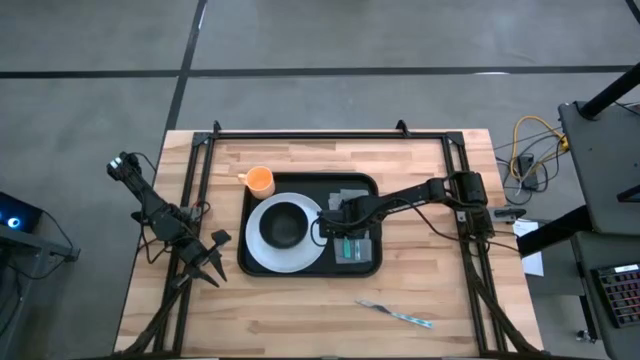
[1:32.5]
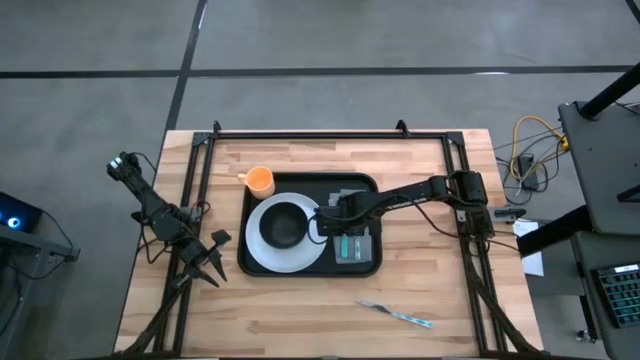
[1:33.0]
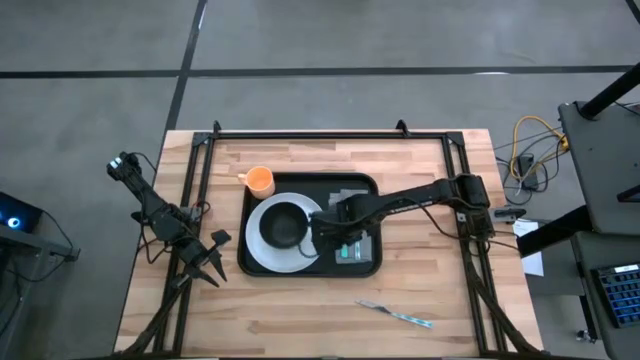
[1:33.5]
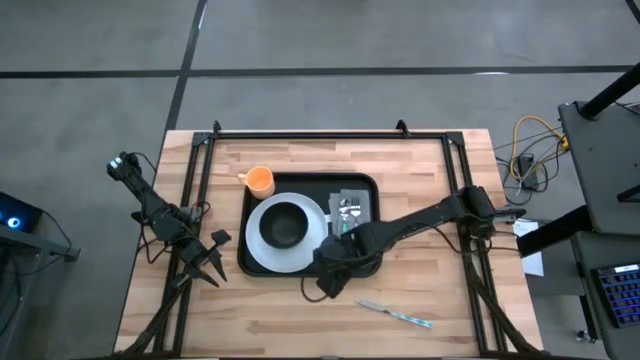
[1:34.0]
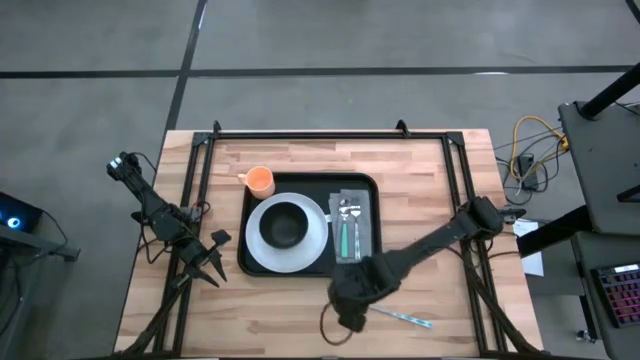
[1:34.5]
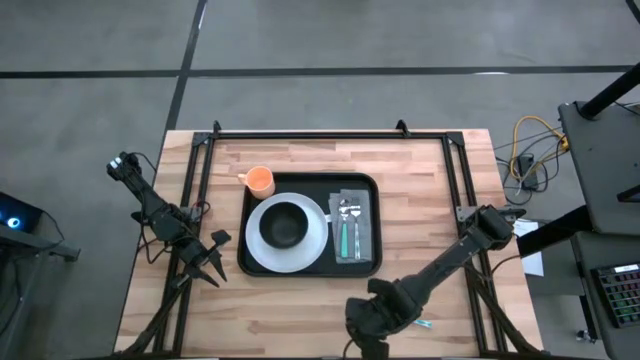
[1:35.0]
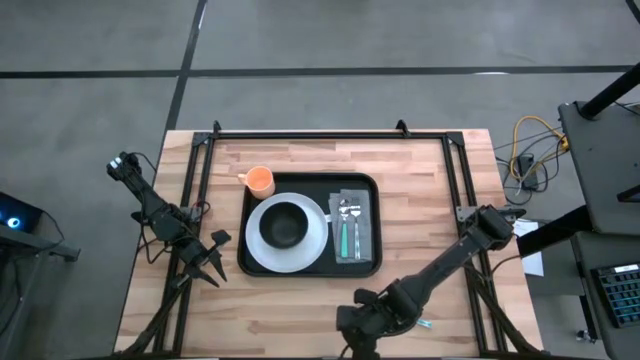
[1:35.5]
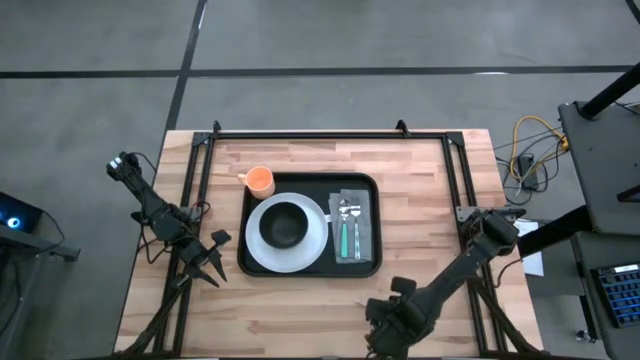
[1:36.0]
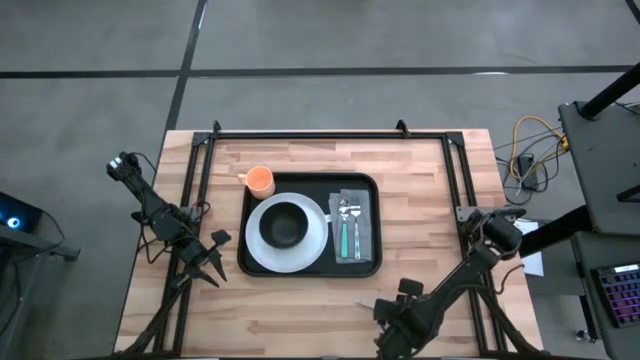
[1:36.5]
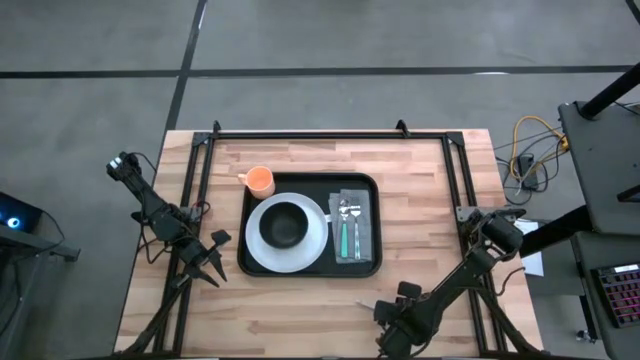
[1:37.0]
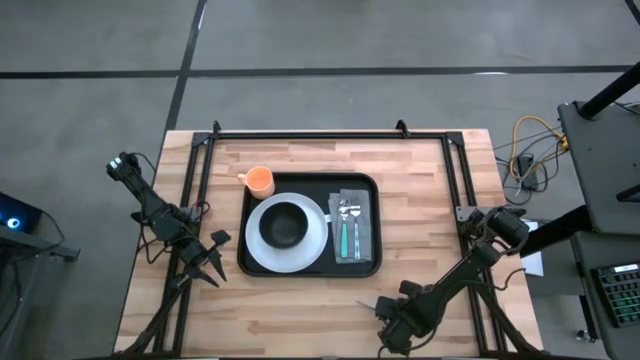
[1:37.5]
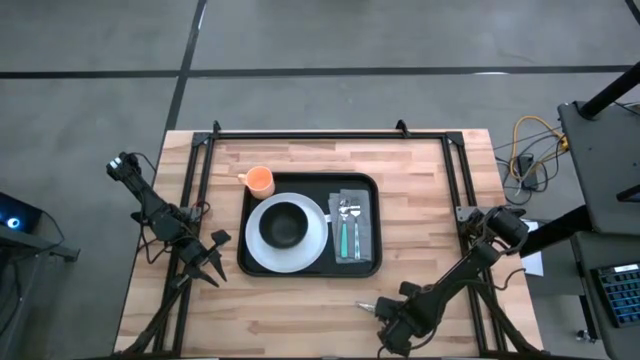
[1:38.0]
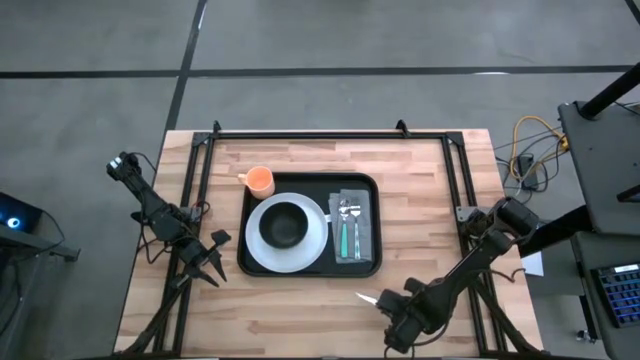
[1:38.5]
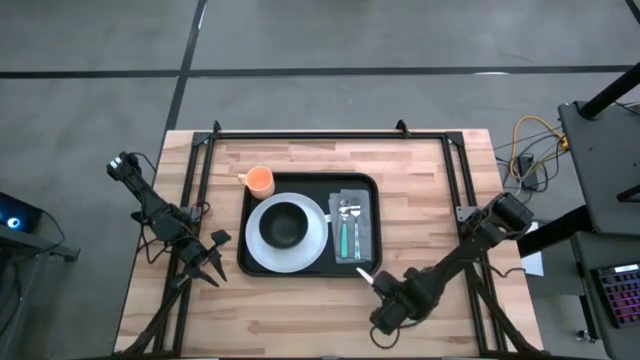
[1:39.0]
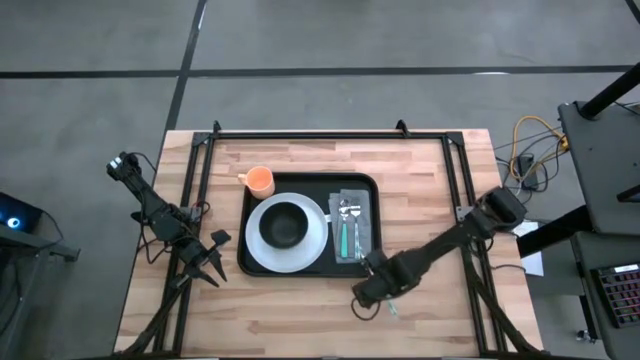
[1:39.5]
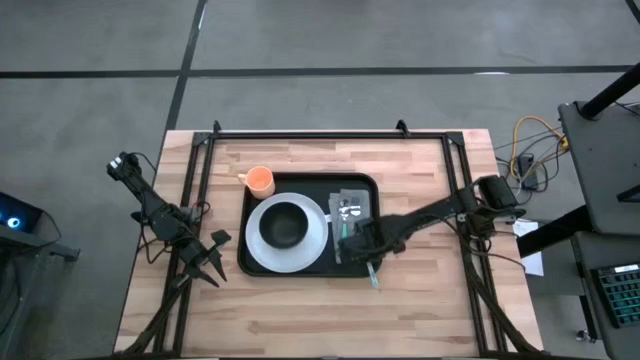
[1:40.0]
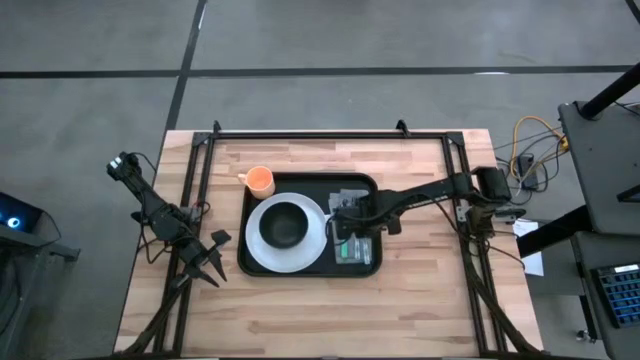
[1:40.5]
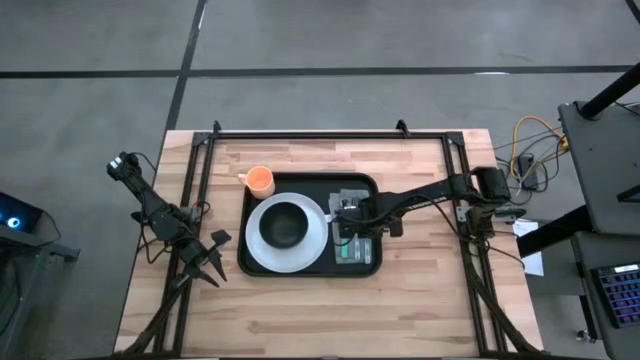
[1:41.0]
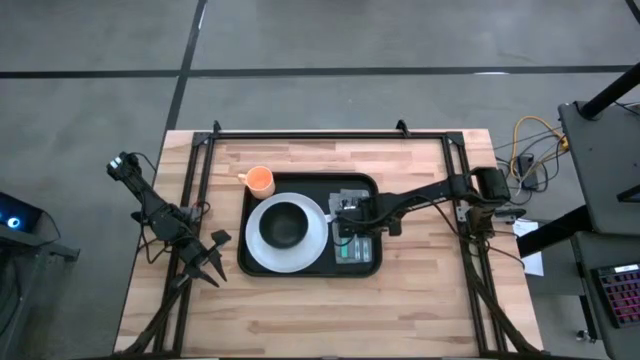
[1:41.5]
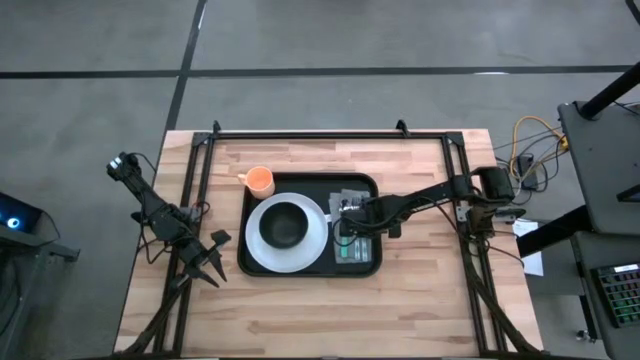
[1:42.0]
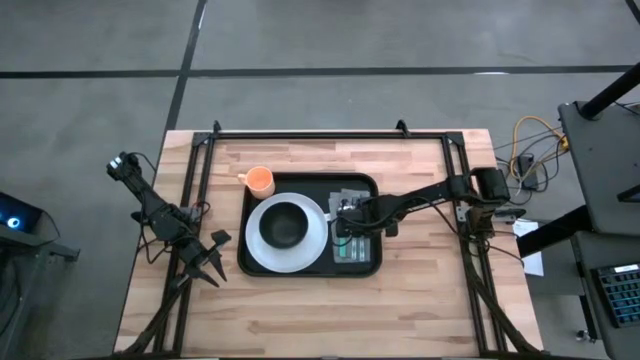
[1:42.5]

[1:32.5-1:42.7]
Task: Set up tray
Put the knife on top of the napkin on the right of the fork

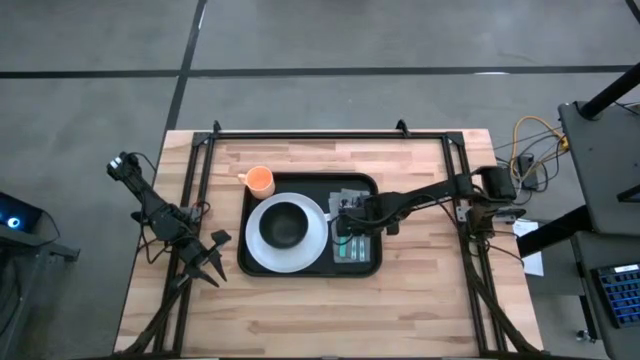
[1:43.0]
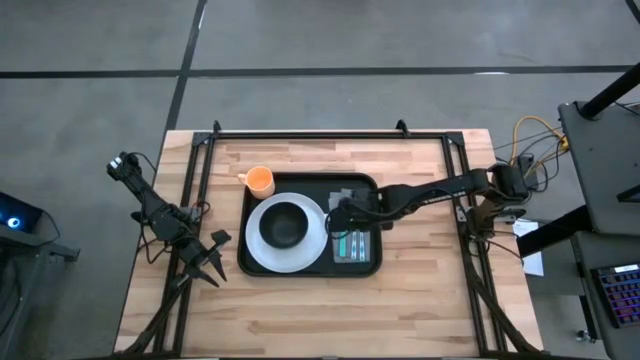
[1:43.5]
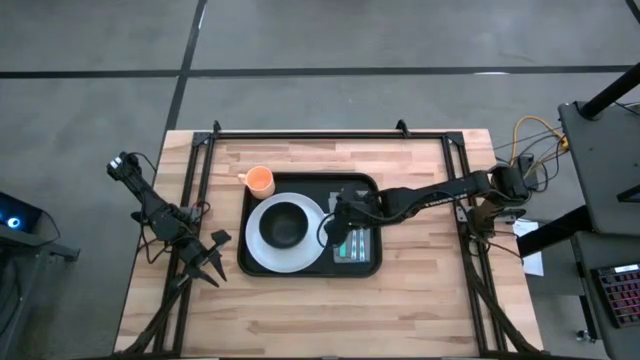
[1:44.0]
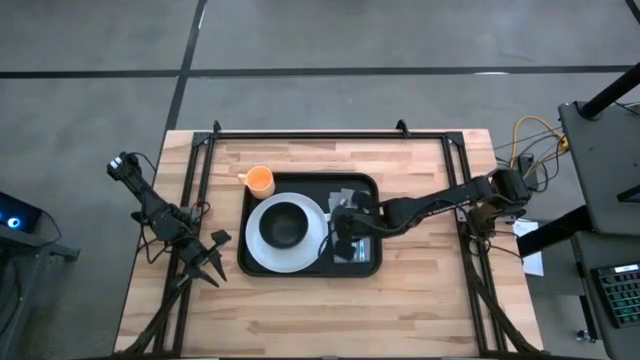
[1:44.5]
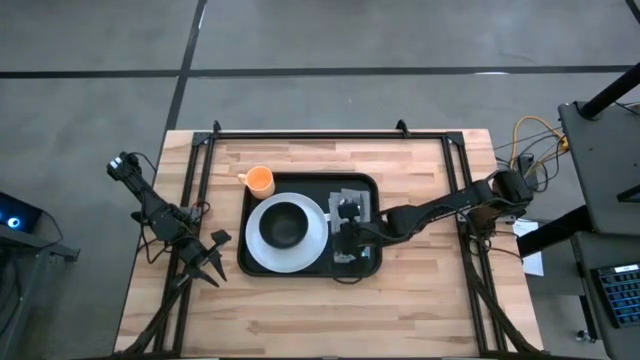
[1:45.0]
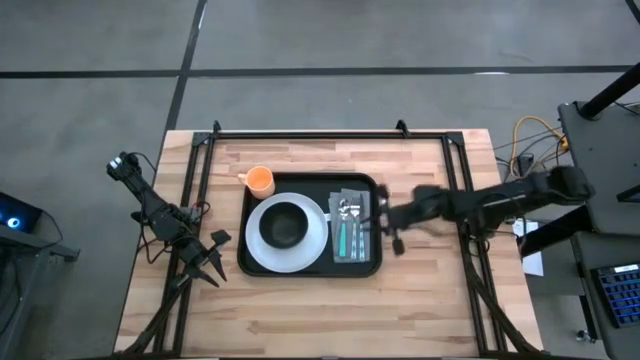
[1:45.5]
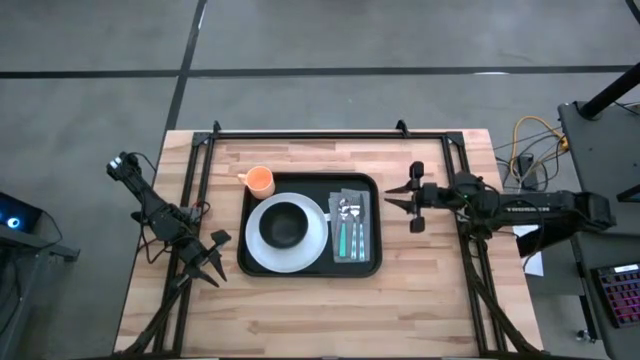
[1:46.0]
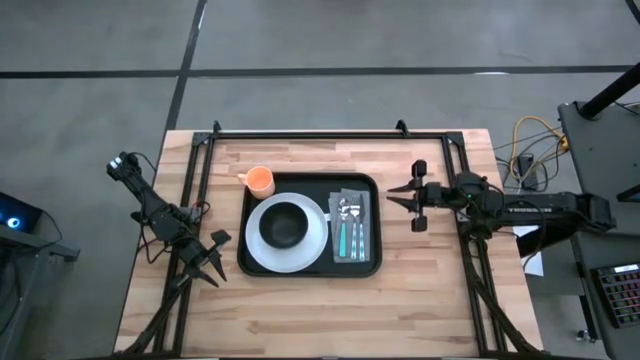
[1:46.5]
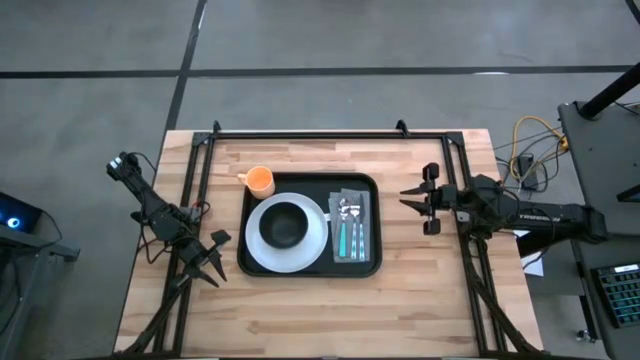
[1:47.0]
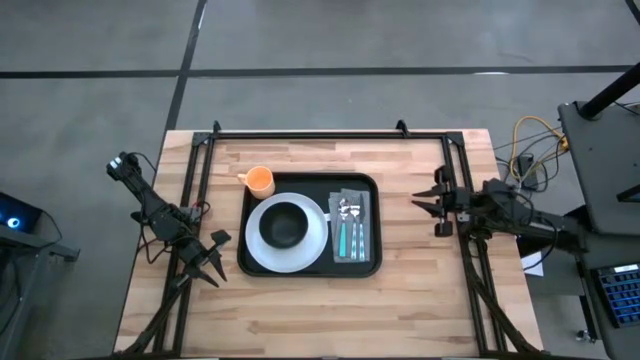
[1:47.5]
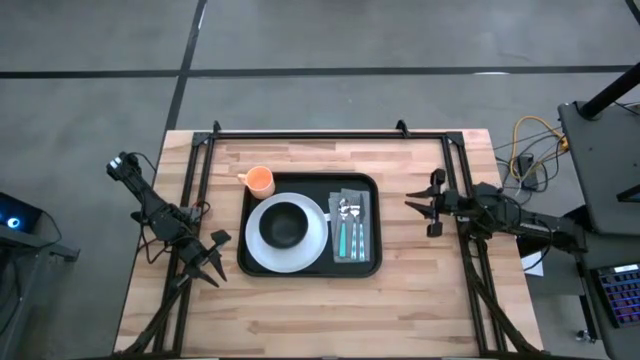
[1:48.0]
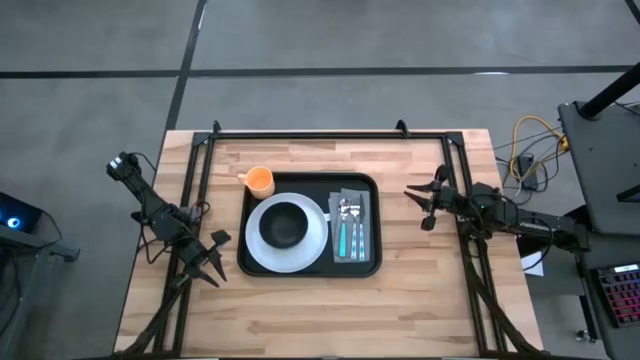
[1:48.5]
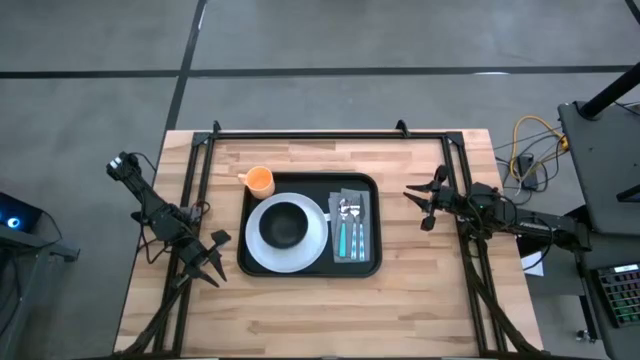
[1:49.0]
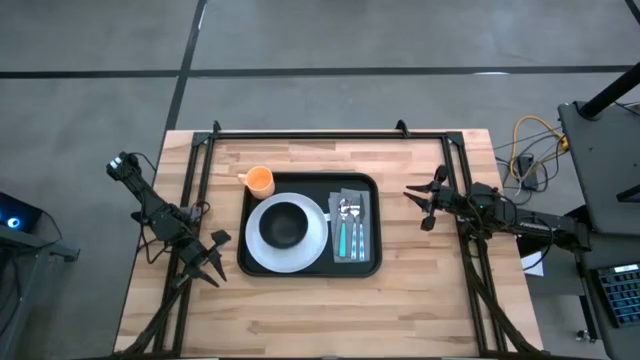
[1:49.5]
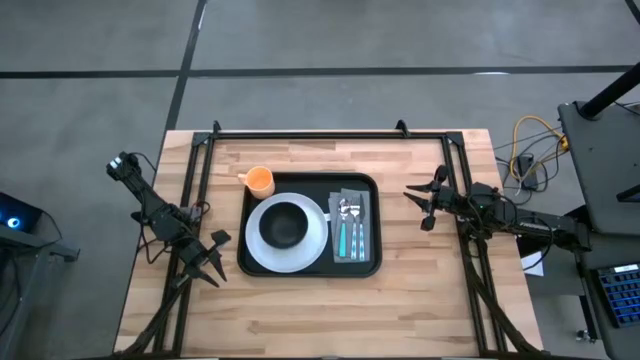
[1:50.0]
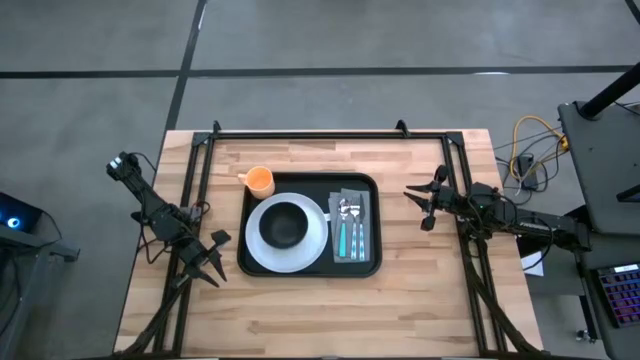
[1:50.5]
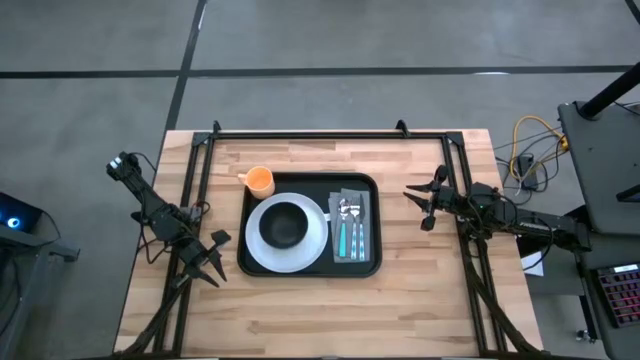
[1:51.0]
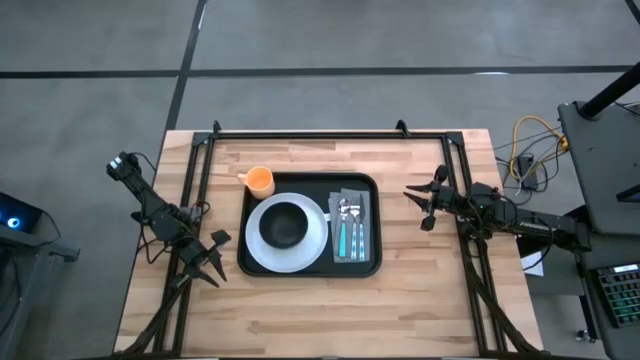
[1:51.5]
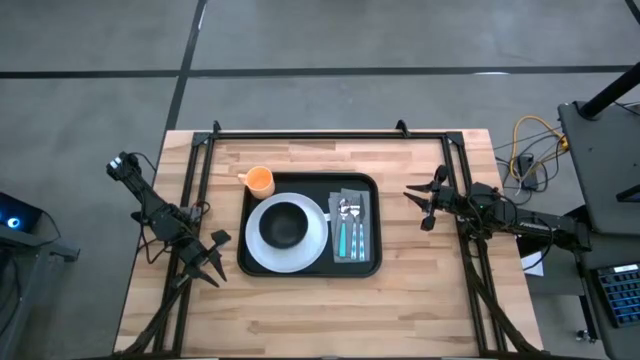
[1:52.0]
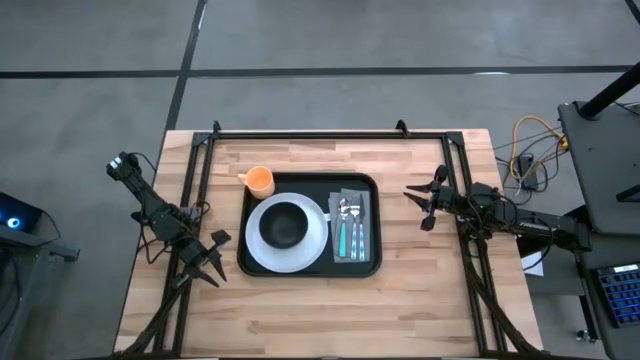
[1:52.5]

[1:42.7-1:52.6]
Return to Home Position
